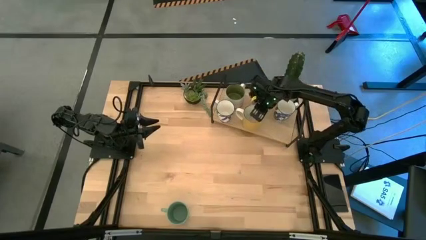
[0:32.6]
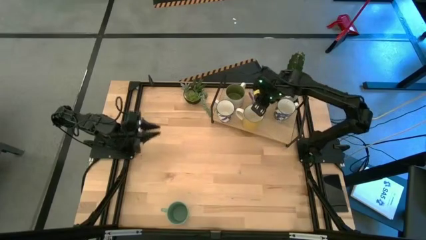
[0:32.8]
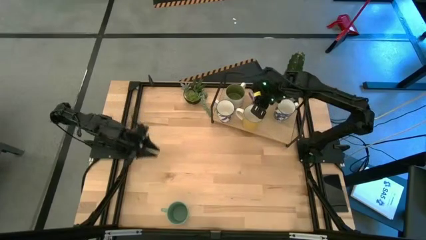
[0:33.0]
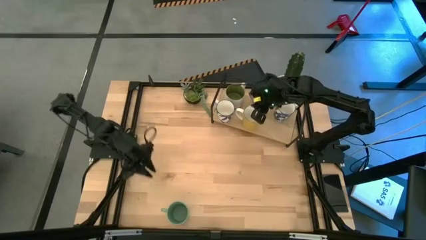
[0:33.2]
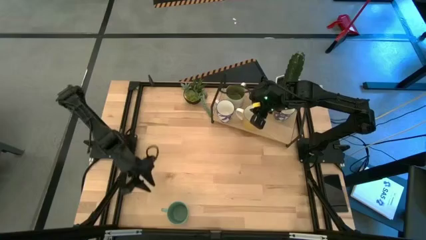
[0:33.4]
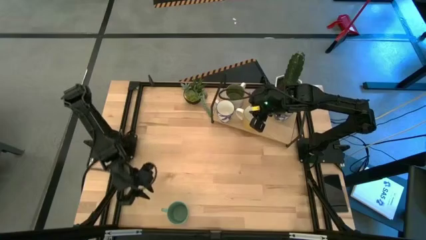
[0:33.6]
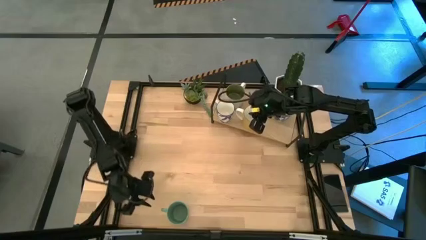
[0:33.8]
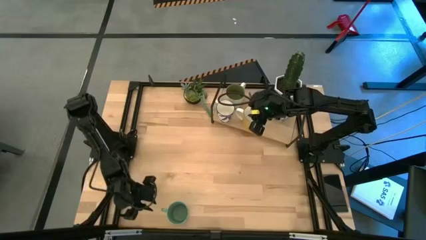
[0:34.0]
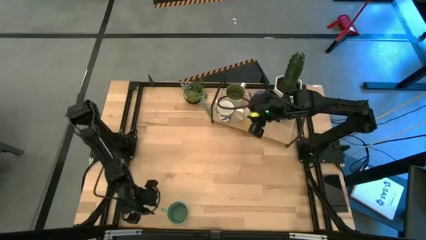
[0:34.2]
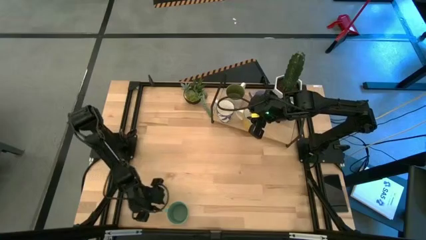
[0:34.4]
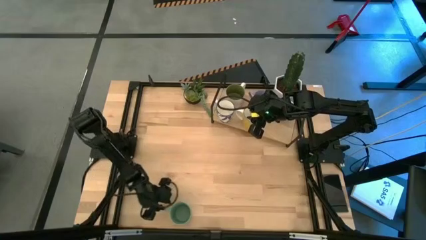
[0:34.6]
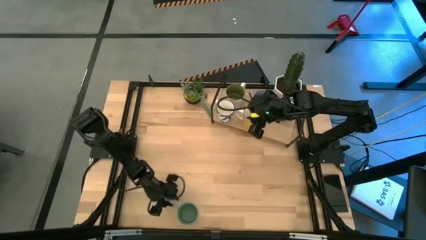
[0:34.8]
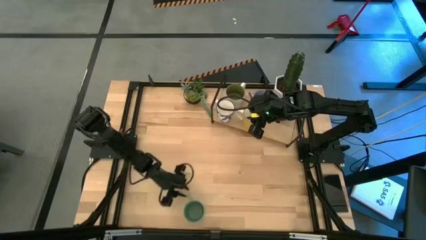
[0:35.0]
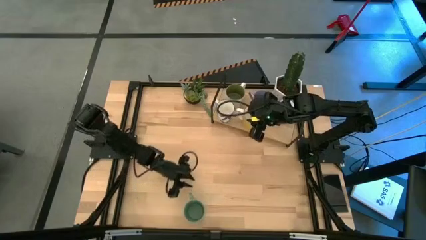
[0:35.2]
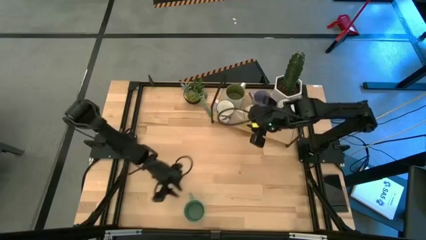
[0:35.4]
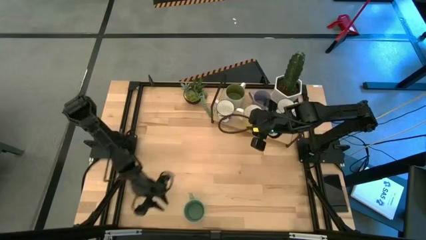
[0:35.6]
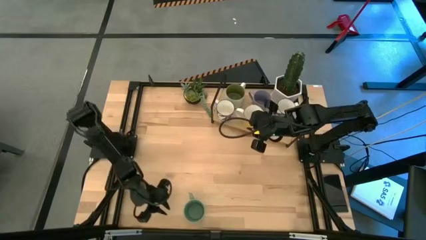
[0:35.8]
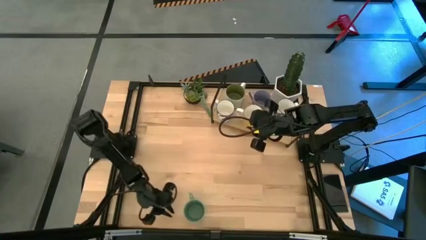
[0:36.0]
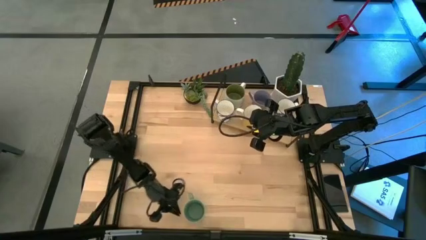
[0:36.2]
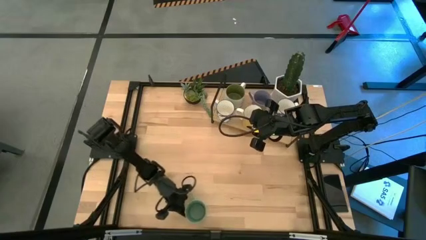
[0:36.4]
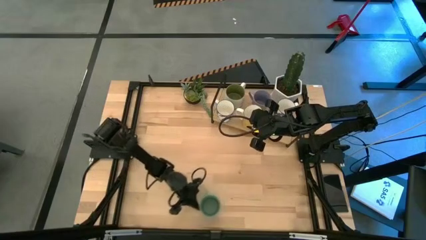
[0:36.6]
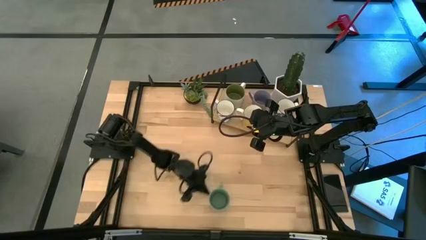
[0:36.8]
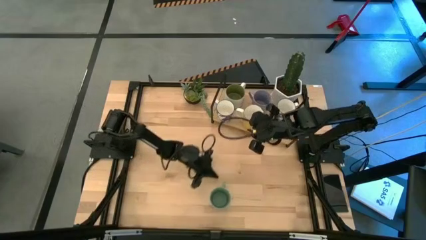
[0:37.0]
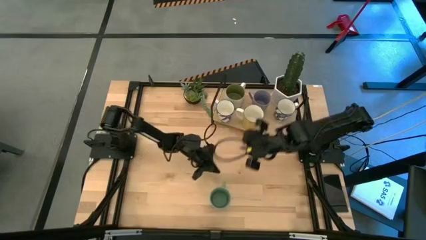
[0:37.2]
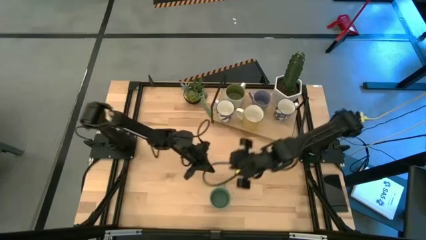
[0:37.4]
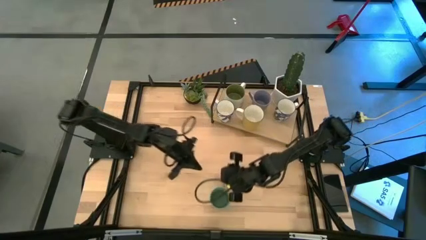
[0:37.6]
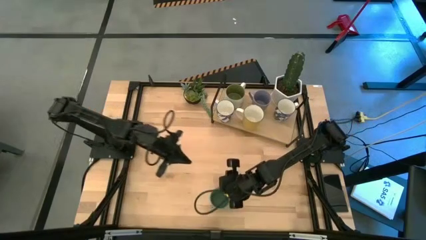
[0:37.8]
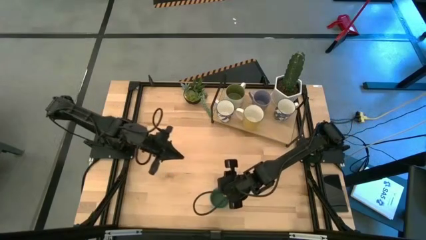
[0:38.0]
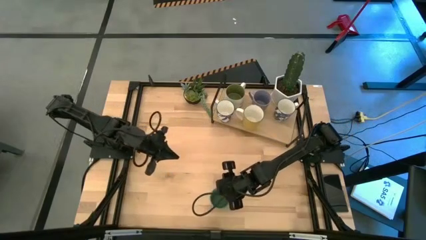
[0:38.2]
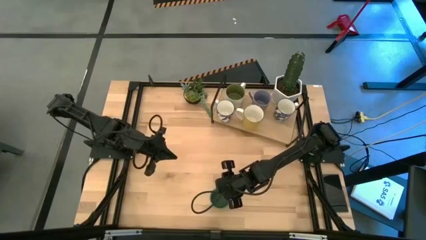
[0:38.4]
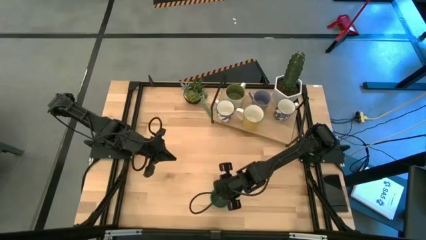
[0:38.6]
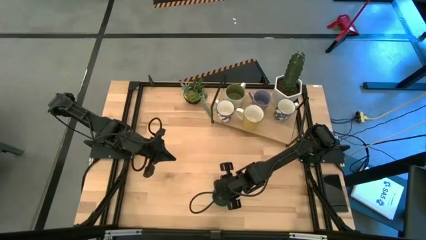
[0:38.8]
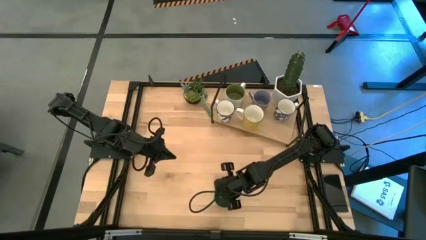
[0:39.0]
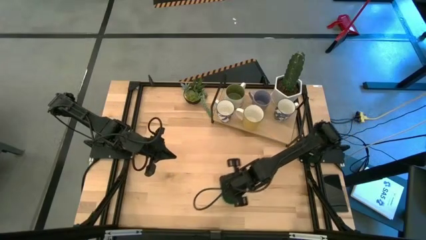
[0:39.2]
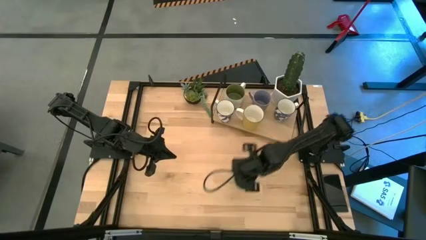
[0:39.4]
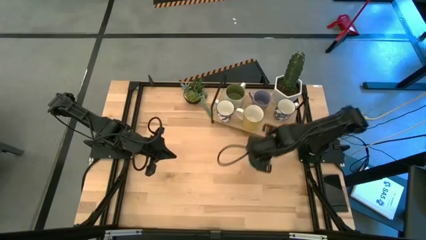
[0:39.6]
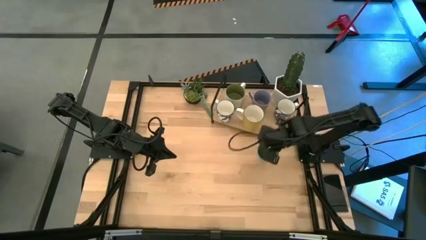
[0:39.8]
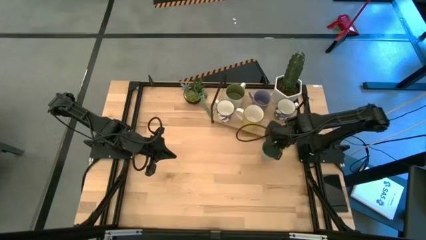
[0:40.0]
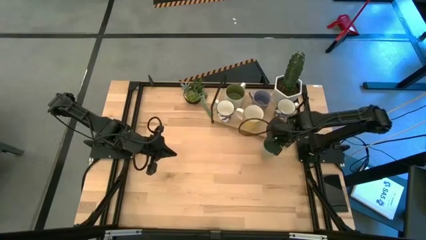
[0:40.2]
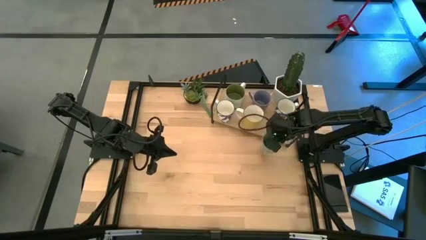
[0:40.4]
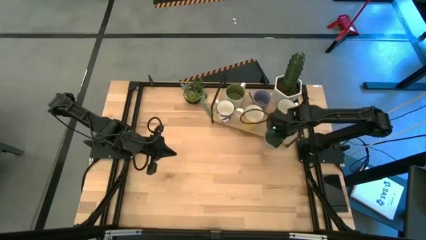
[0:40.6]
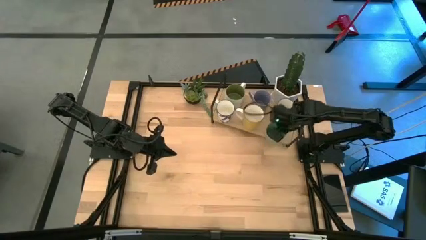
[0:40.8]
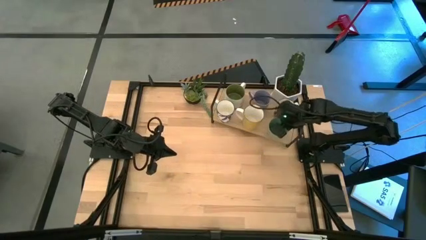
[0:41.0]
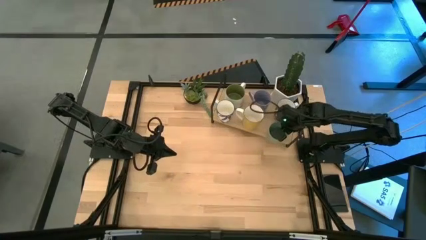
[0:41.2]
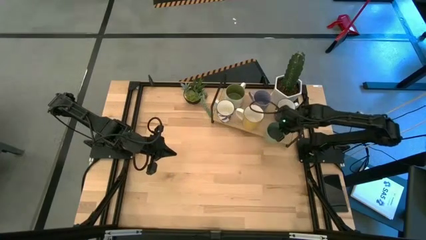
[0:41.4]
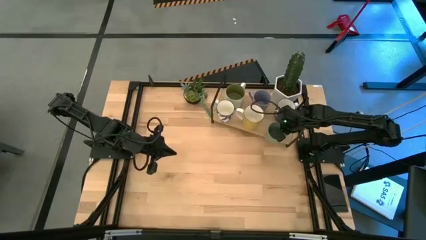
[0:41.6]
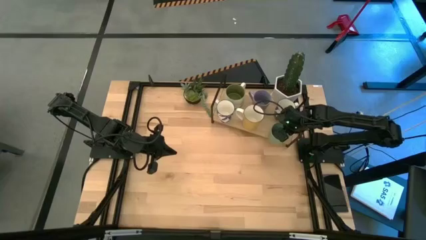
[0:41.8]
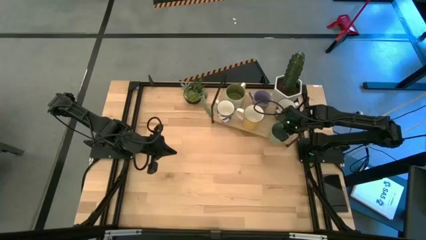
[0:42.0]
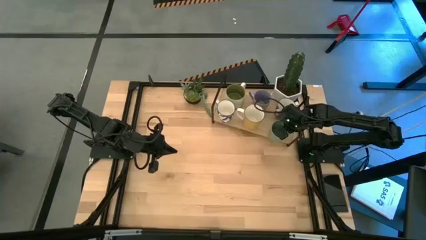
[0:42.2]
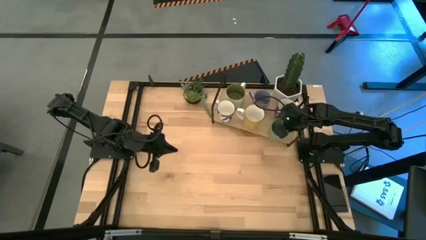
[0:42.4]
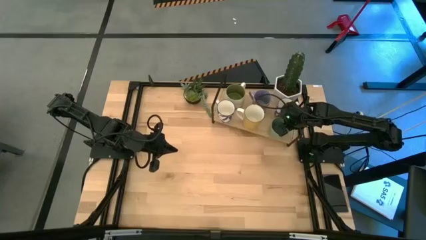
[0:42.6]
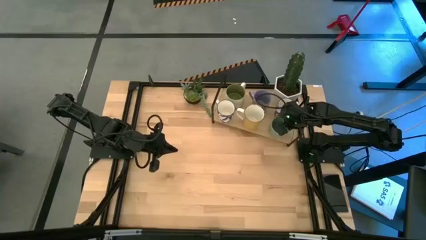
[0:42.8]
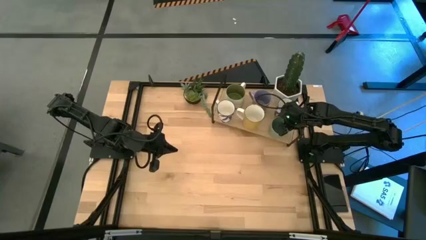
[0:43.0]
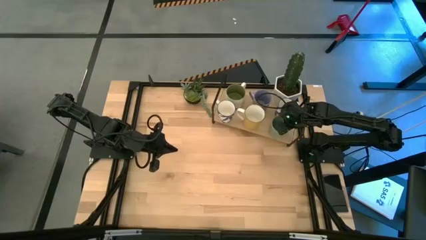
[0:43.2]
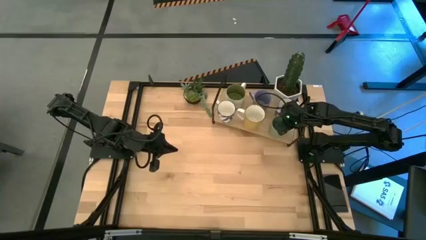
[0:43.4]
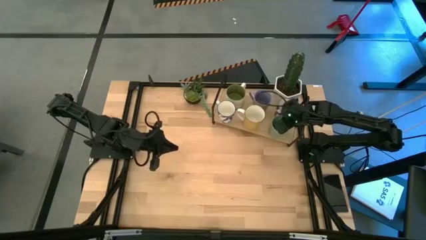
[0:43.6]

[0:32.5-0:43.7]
Task: Place coffee mugs
Put the green mug aligned with the blue patterned mug on the shelf
